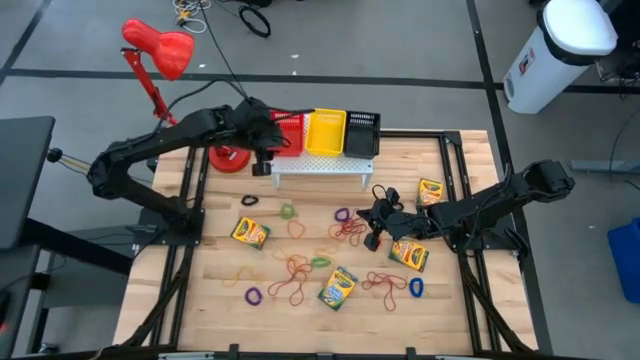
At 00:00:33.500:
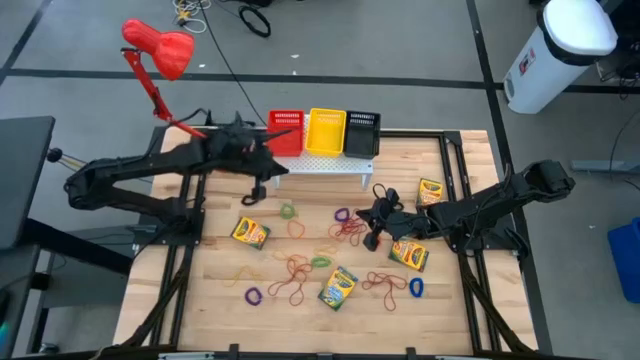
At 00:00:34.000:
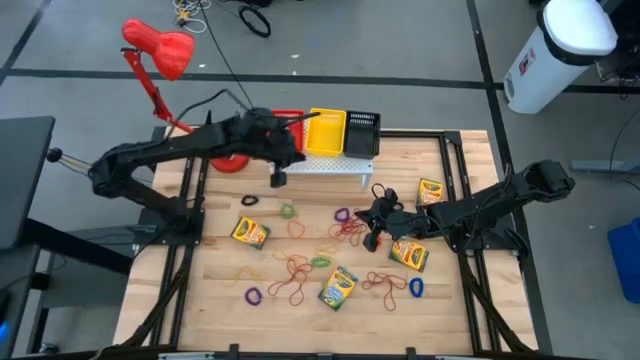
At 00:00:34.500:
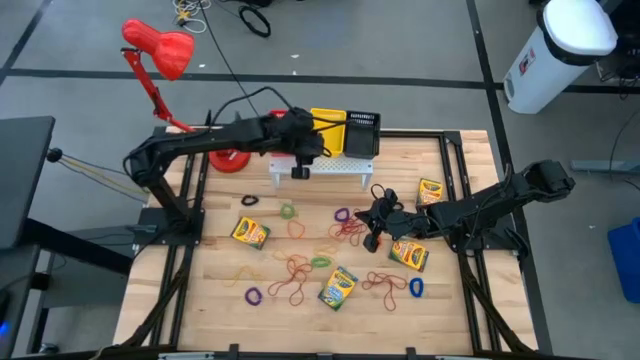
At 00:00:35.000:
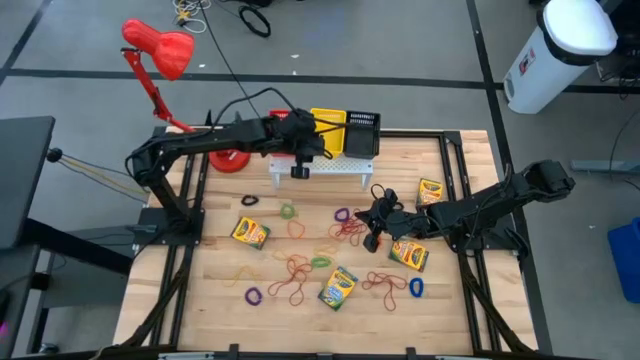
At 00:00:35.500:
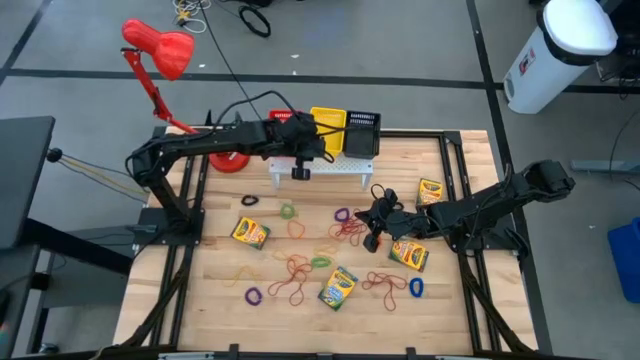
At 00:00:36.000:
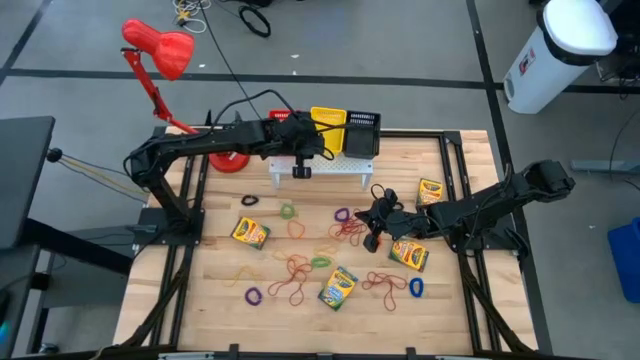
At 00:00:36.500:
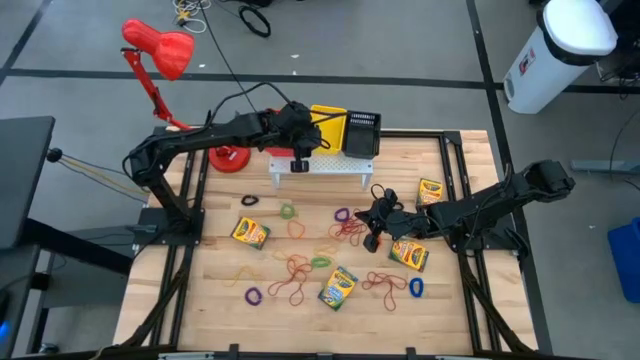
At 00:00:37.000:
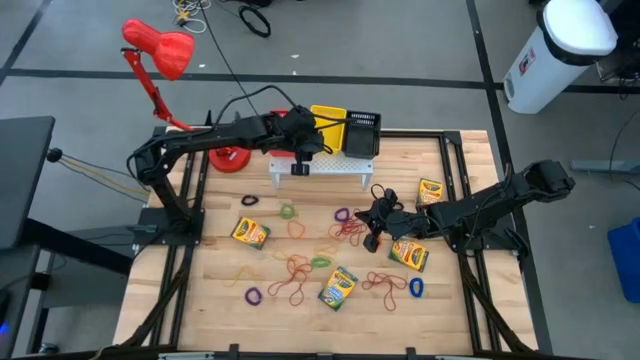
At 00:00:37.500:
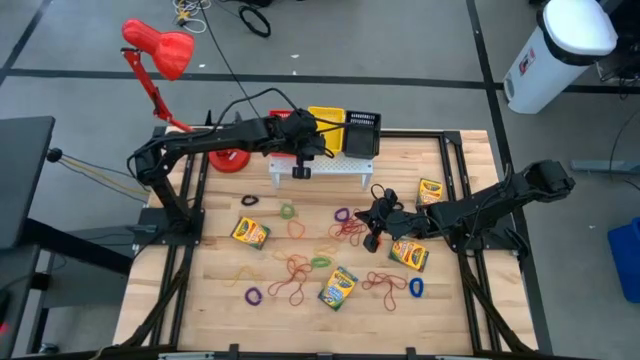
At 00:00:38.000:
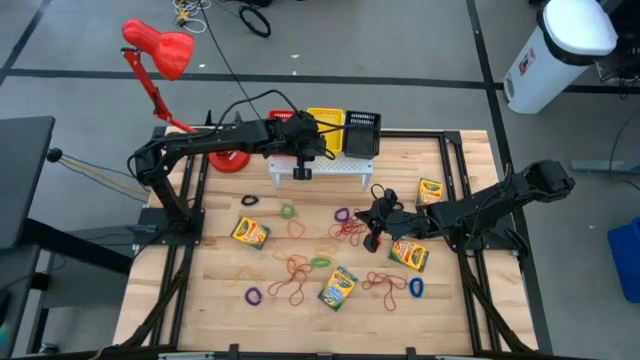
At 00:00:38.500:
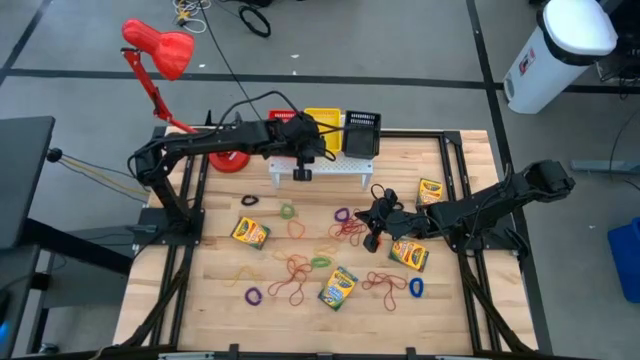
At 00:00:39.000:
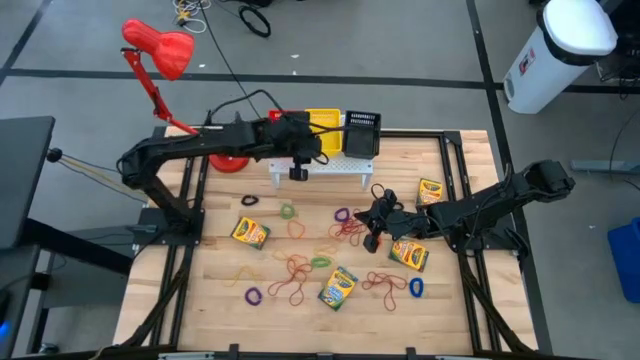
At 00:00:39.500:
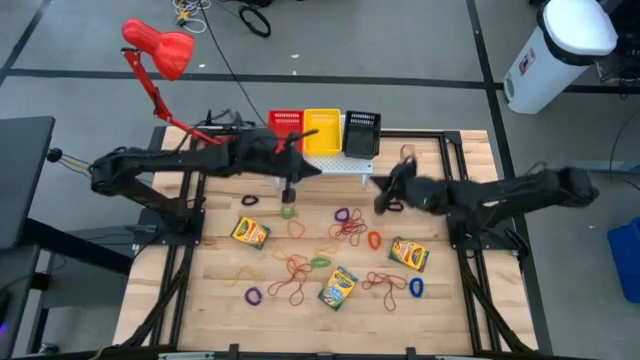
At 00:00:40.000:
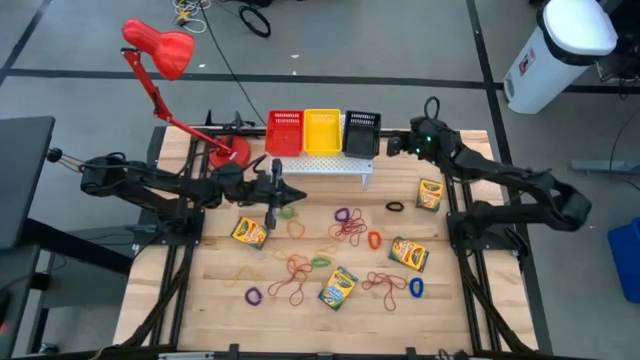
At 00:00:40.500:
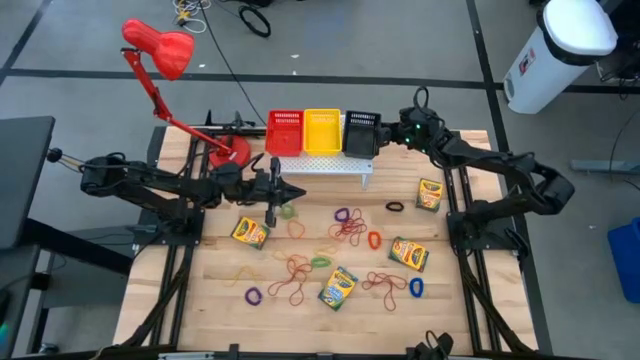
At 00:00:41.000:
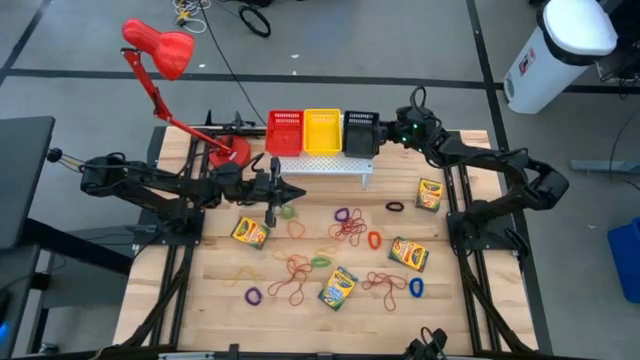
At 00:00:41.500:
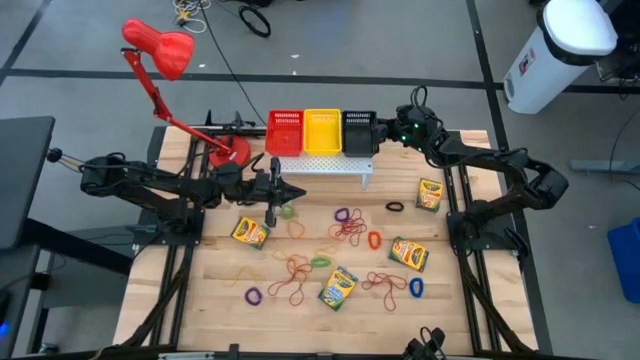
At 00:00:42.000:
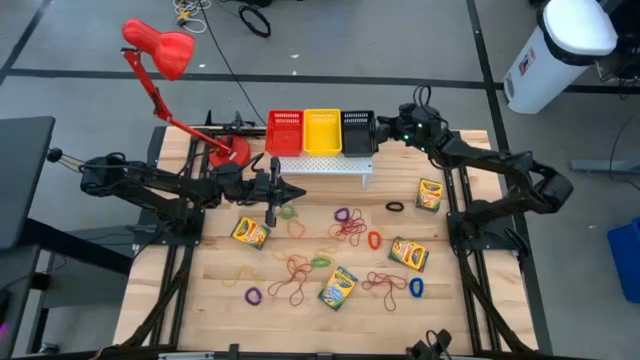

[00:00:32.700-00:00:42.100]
Task: Pick & Place Office Desk Supplies
Adjust the bins on the shelf

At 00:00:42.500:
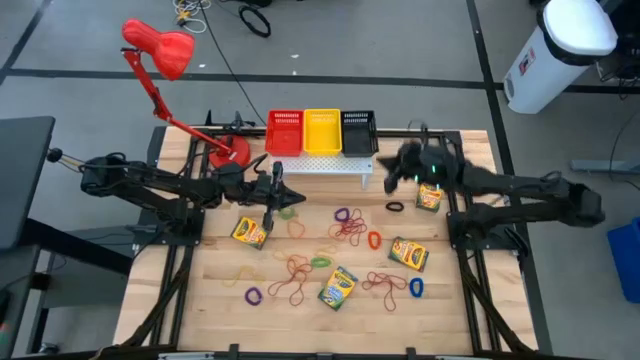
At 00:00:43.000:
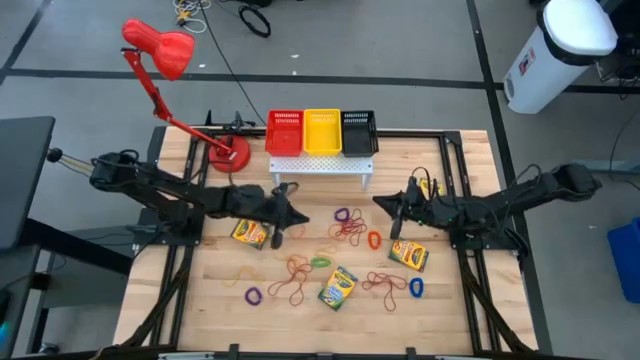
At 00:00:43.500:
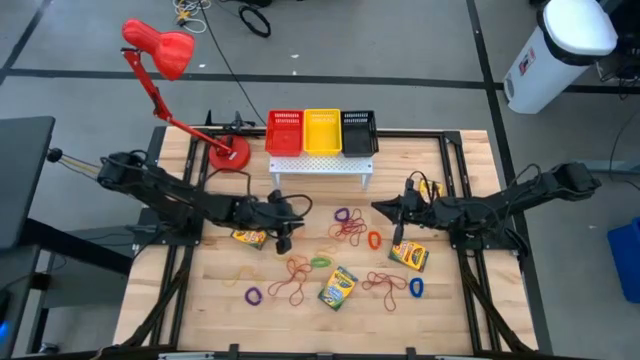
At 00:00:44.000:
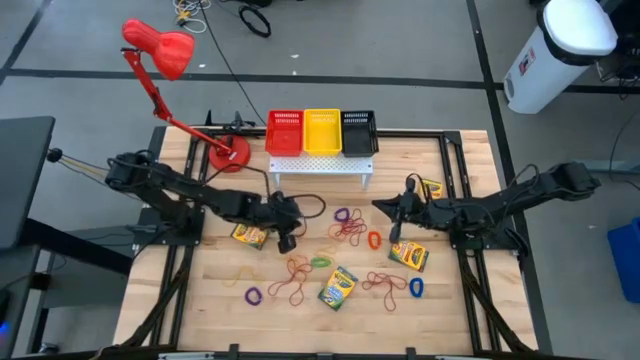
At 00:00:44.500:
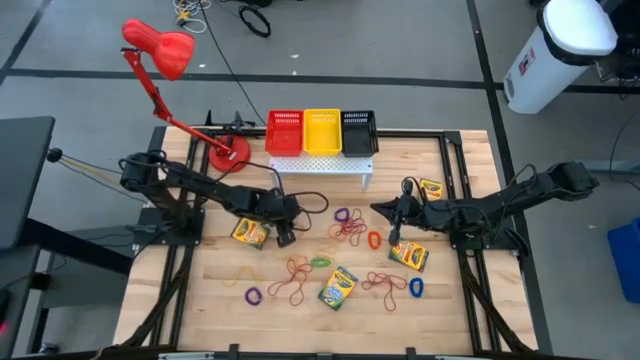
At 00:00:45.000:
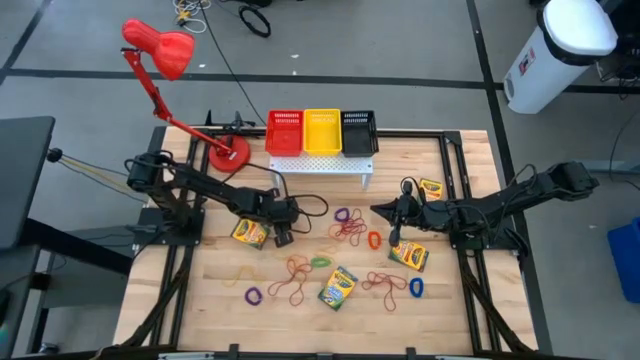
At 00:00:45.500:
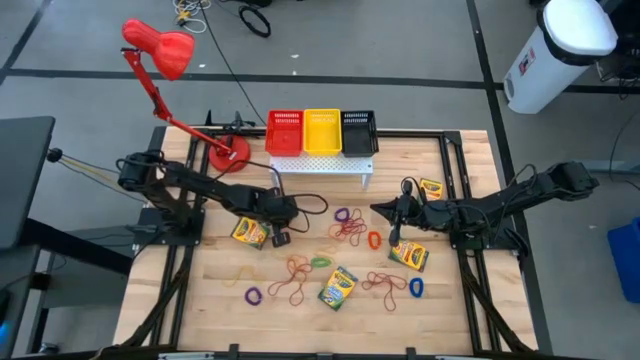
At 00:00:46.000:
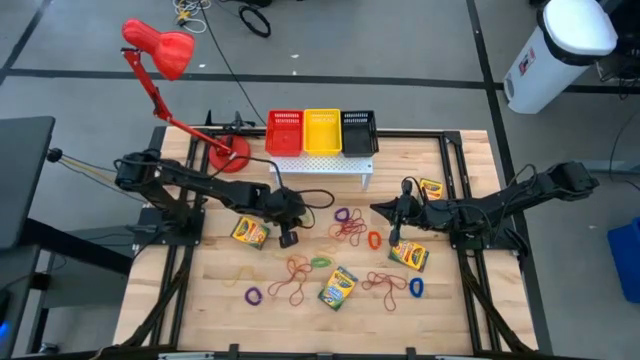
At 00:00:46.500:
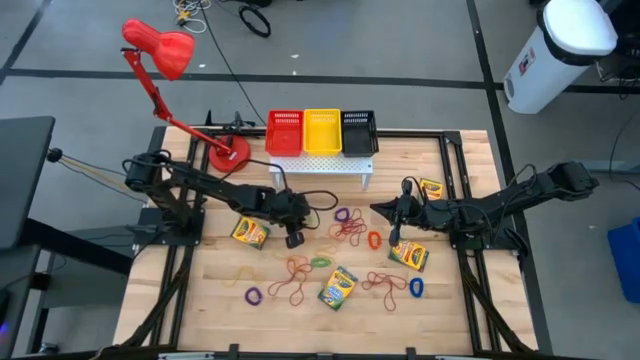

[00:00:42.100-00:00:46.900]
Put the green spring keychain into the yellow bin on the shelf

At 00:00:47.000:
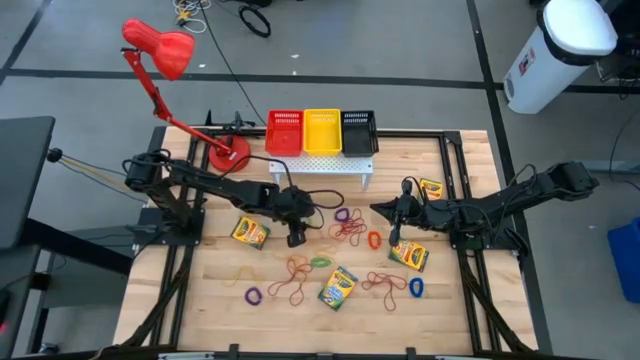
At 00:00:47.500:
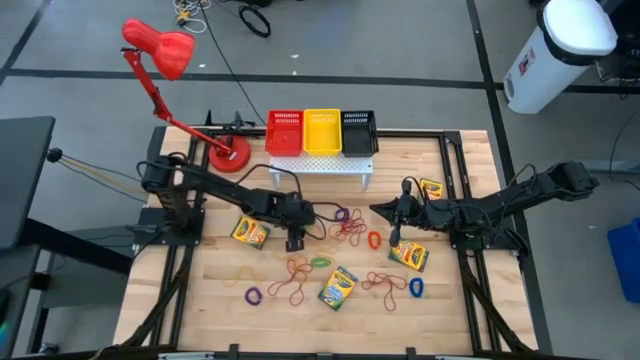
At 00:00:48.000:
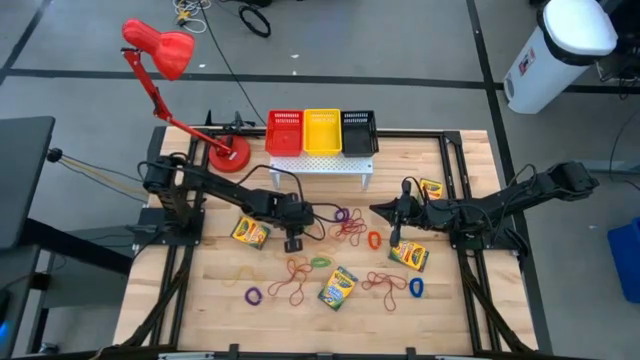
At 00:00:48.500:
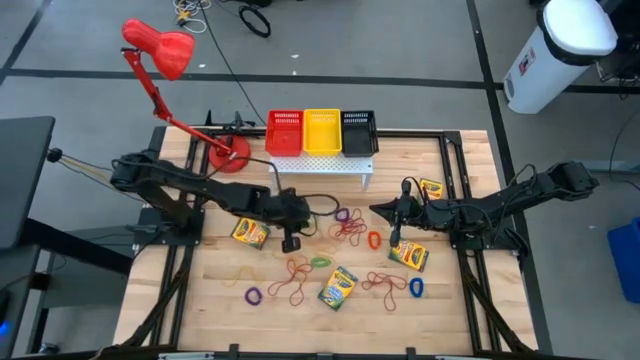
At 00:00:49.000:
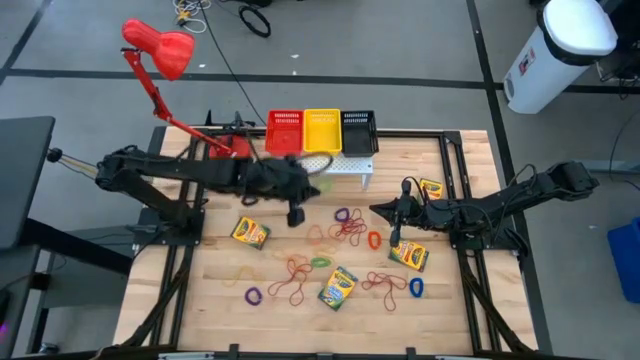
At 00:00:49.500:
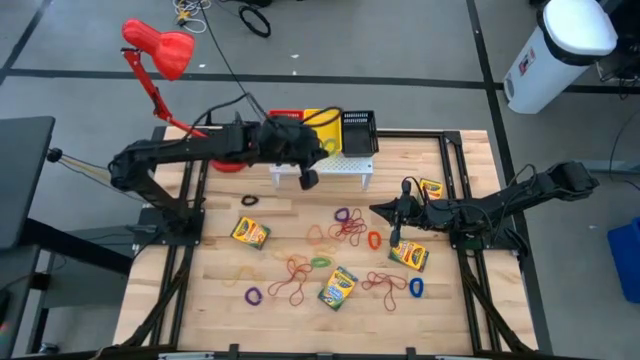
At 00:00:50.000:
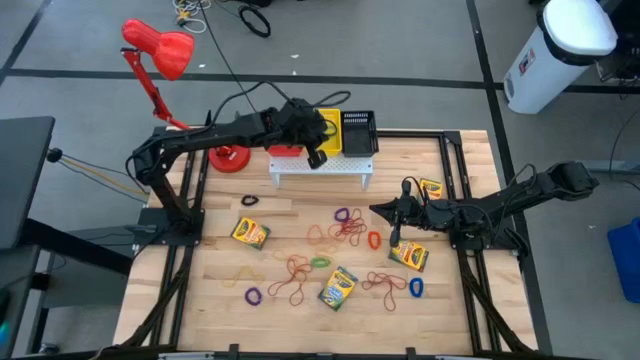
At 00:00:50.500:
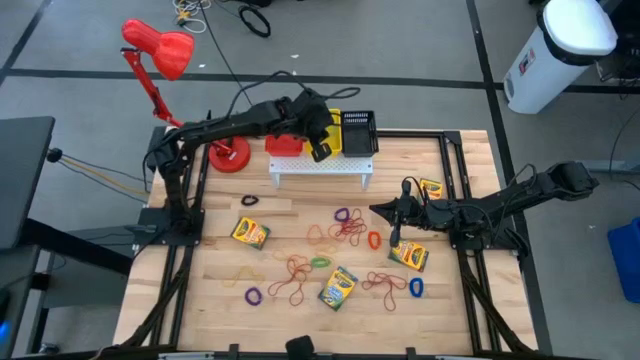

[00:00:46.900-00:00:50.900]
Put the green spring keychain into the yellow bin on the shelf

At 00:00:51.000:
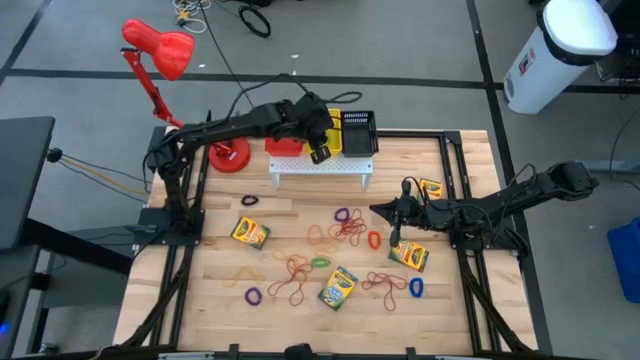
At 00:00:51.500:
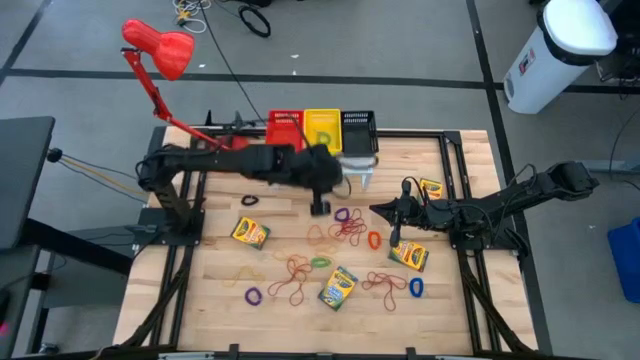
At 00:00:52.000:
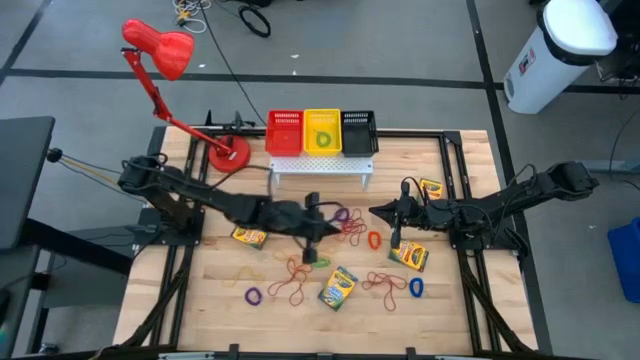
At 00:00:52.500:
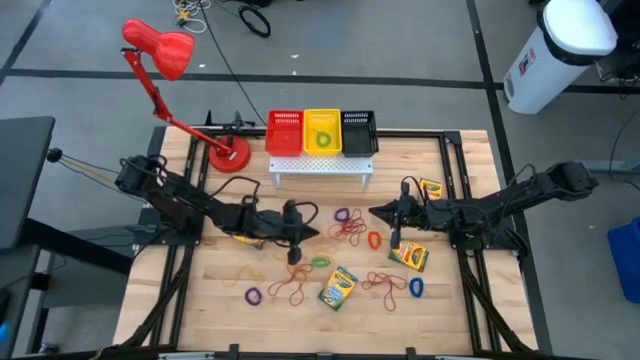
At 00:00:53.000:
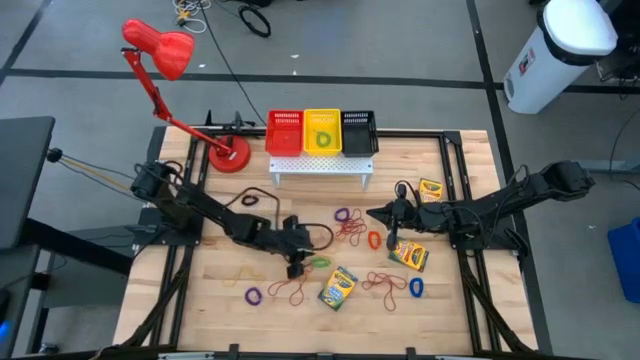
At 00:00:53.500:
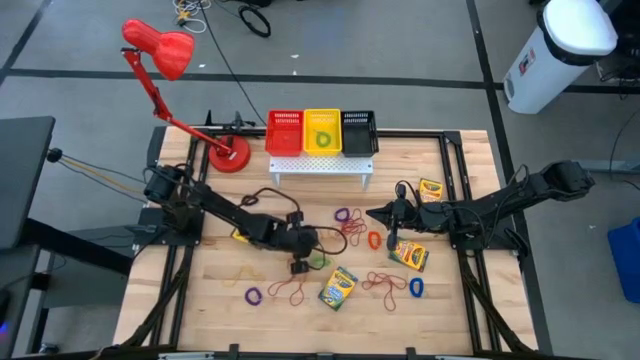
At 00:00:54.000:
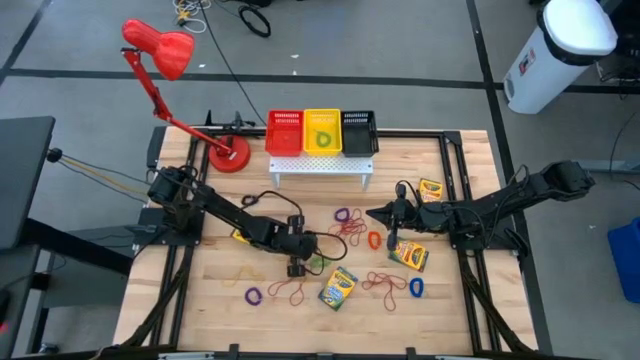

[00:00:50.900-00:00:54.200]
Put the orange rubber band into the red bin on the shelf

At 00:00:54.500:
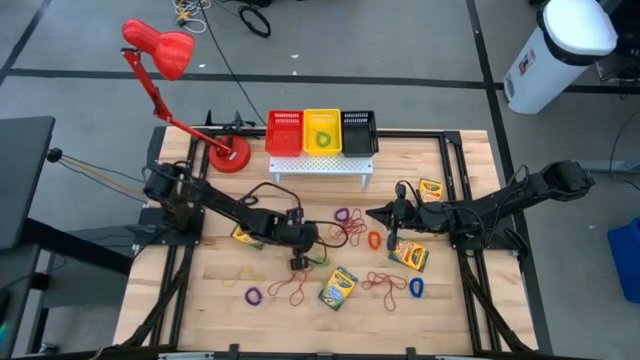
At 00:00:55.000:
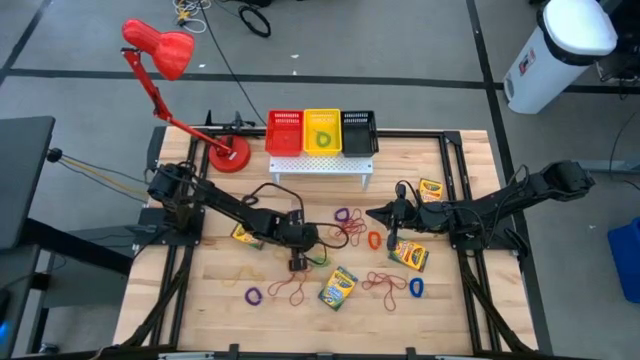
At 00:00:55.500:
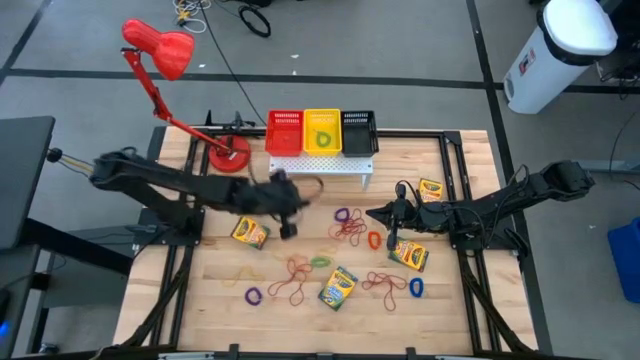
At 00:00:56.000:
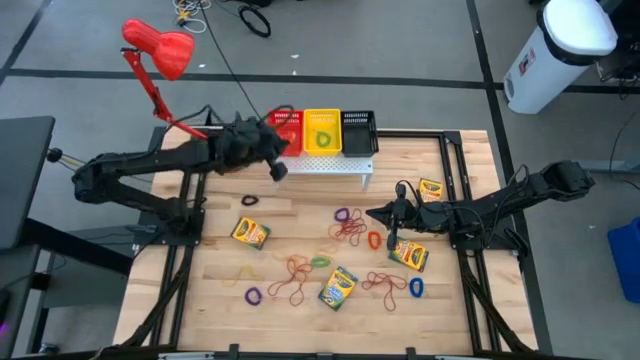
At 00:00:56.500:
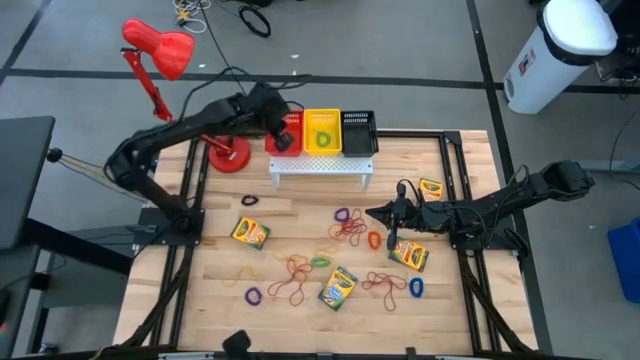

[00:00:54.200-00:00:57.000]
Put the orange rubber band into the red bin on the shelf
